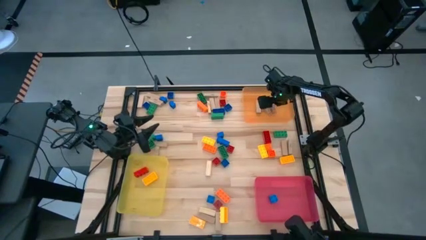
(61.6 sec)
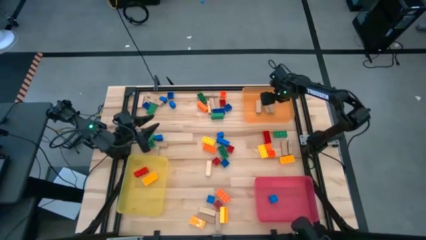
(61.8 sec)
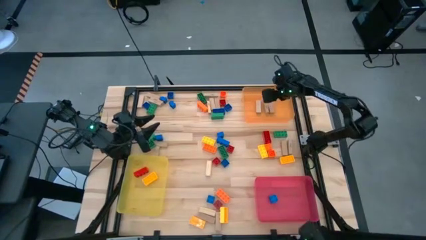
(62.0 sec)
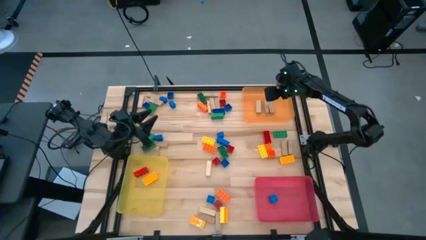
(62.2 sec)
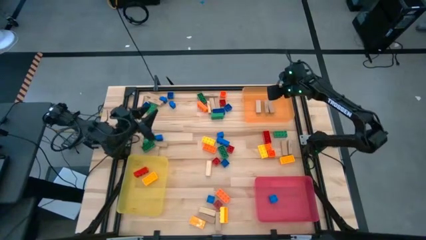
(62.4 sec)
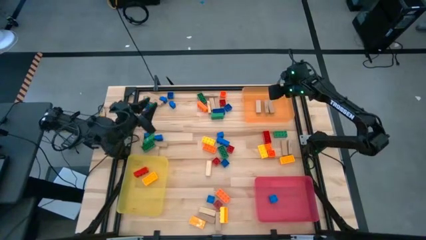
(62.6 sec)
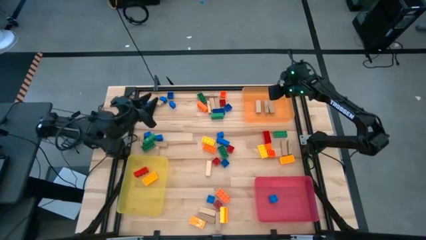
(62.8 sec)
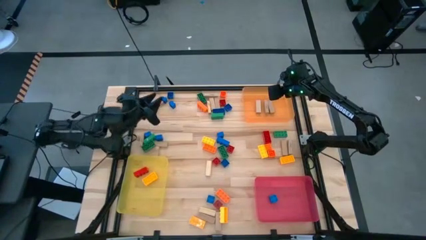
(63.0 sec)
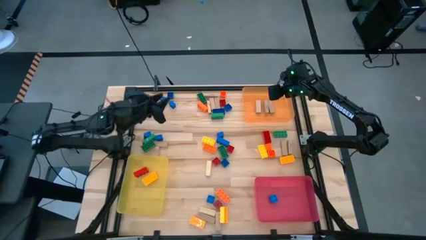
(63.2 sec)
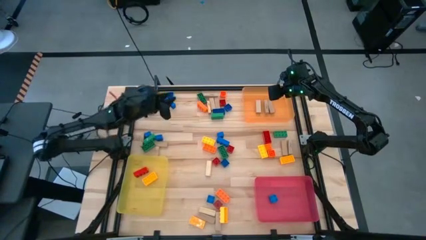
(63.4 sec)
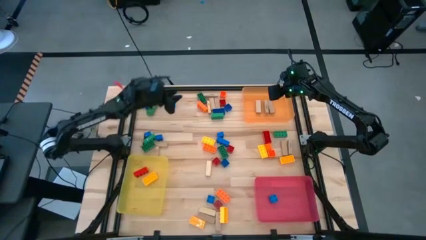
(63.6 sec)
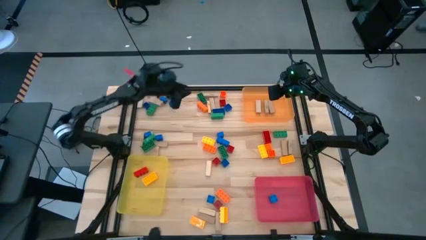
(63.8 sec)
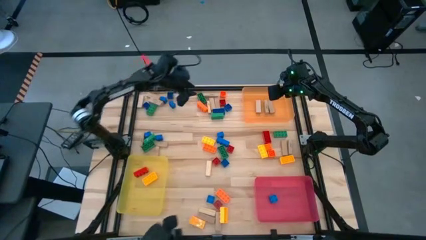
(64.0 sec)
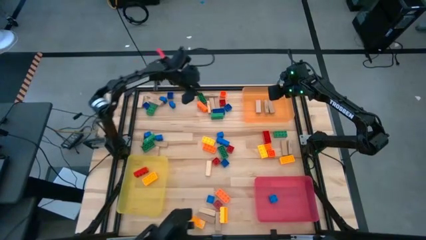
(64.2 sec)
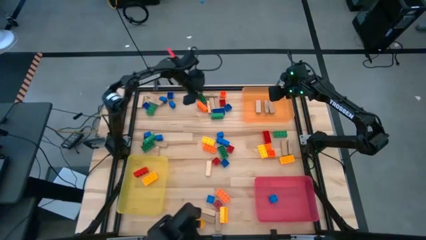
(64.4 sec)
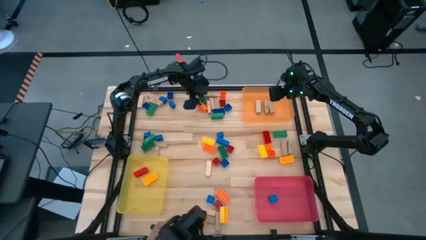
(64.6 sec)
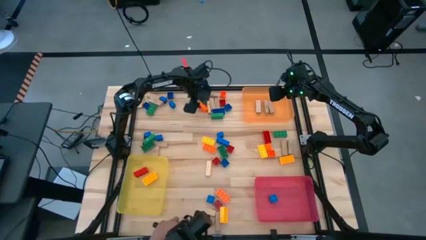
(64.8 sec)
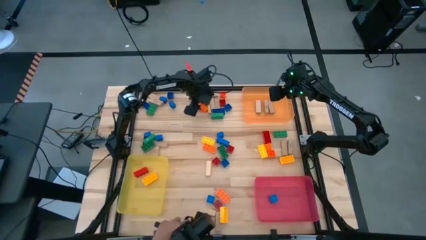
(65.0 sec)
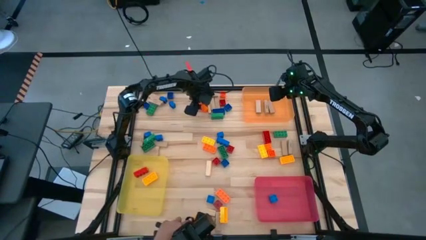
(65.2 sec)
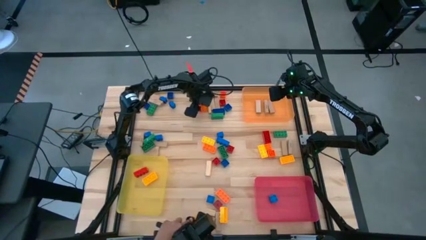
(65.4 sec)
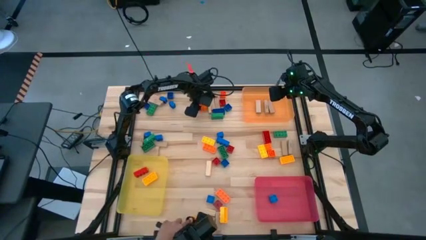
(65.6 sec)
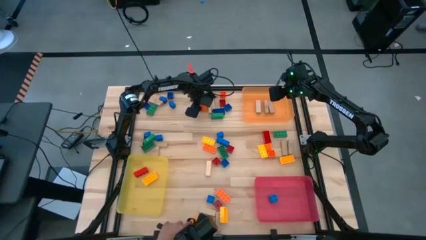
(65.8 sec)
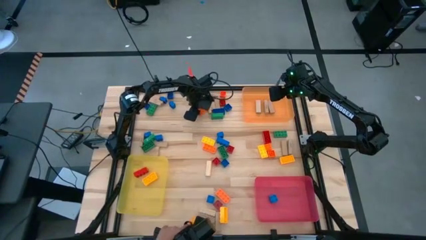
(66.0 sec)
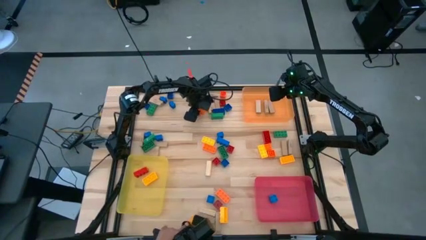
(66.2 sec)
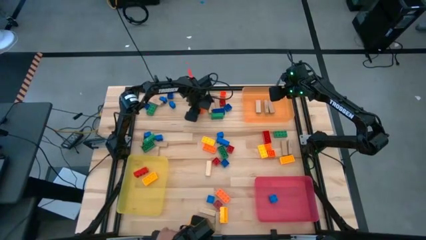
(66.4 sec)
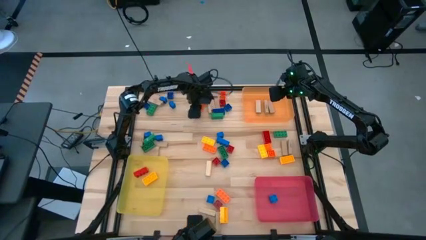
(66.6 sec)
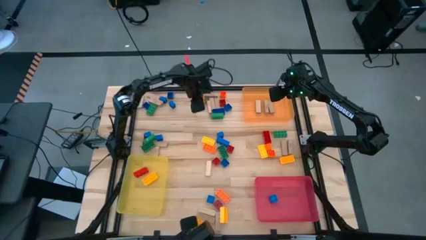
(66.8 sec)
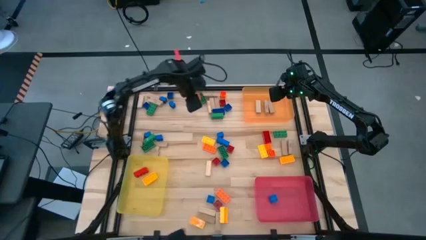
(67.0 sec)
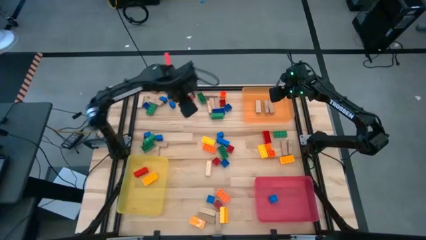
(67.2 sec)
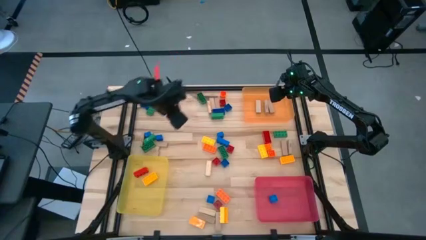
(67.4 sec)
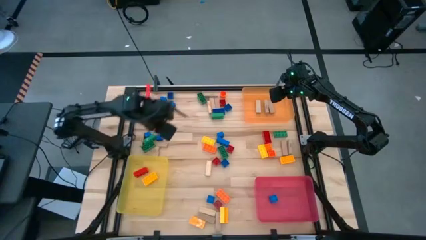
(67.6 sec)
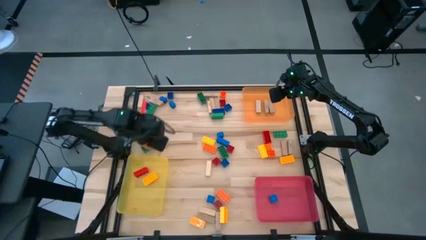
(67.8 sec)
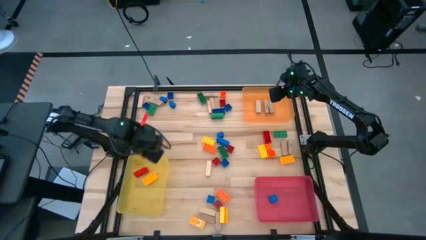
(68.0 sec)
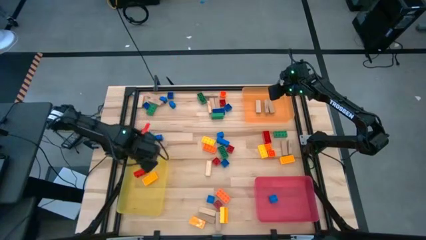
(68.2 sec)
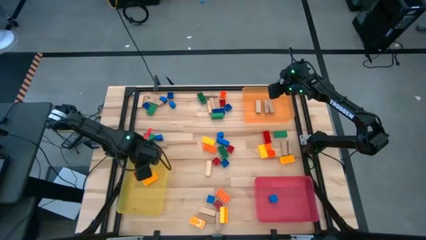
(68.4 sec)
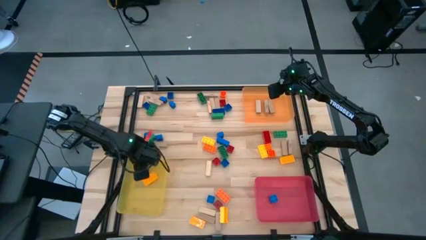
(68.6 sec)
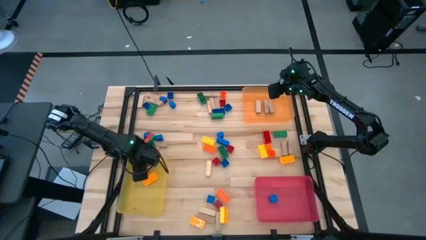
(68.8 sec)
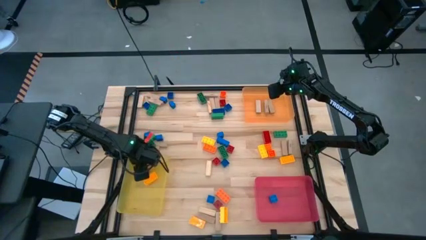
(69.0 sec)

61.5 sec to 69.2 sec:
Task: Sort blocks by size
Put the large orange game piece into the yellow bin

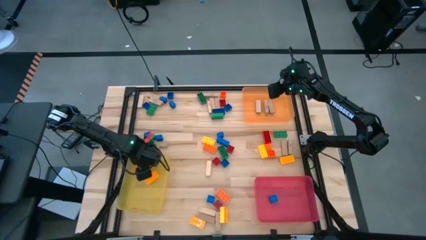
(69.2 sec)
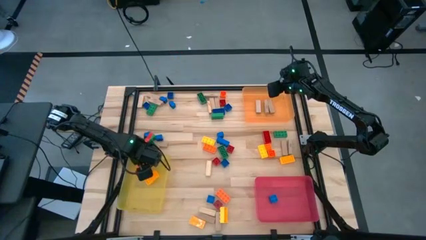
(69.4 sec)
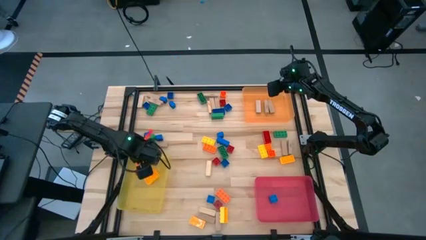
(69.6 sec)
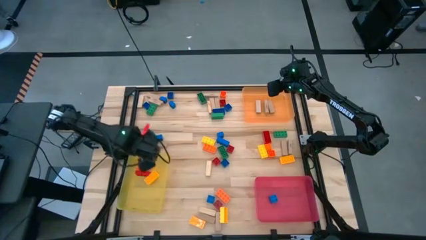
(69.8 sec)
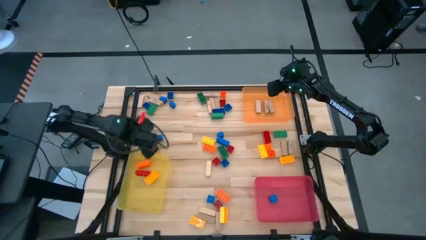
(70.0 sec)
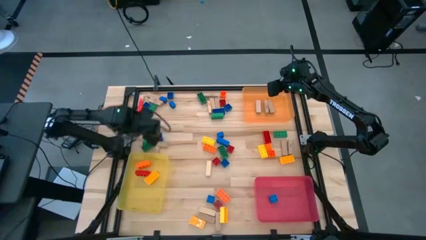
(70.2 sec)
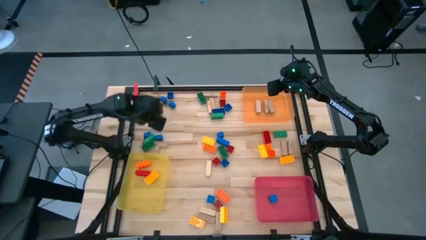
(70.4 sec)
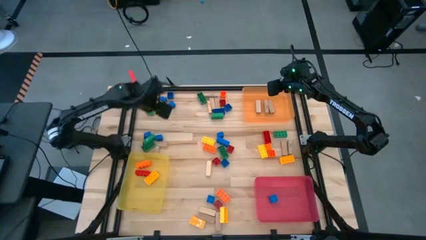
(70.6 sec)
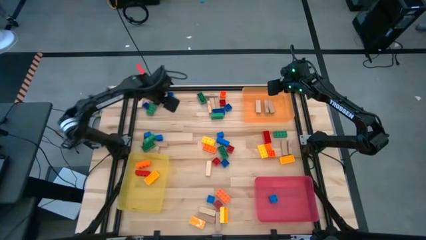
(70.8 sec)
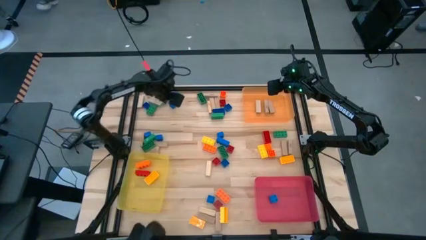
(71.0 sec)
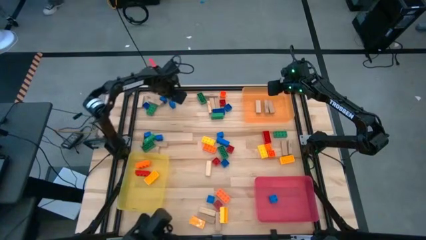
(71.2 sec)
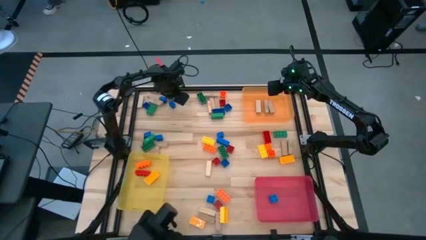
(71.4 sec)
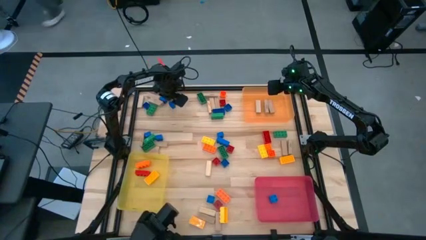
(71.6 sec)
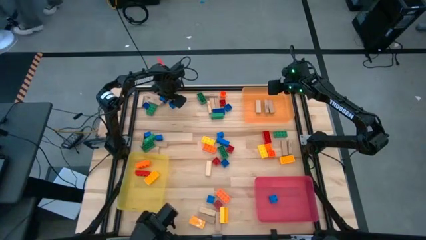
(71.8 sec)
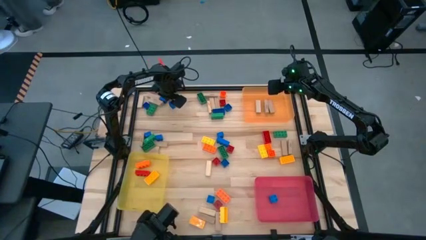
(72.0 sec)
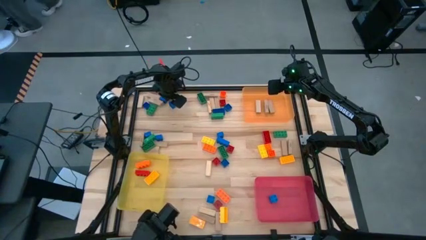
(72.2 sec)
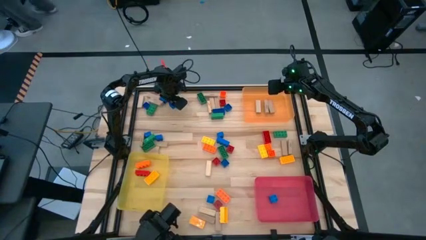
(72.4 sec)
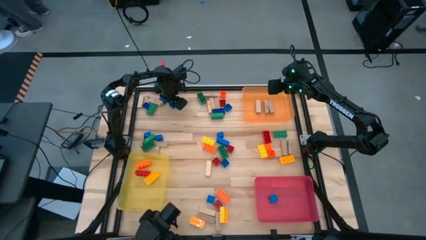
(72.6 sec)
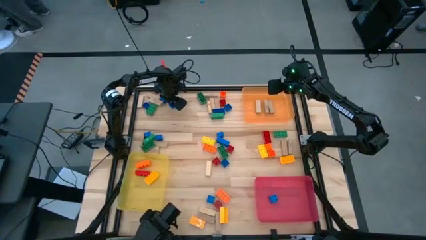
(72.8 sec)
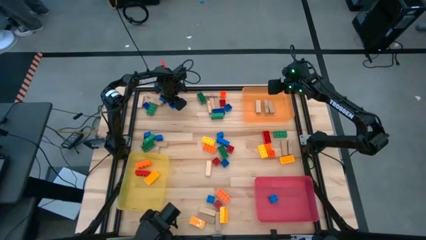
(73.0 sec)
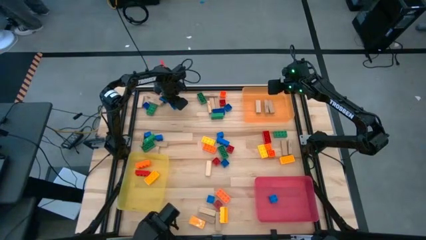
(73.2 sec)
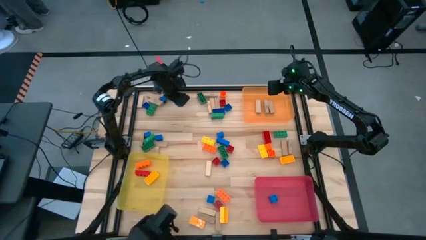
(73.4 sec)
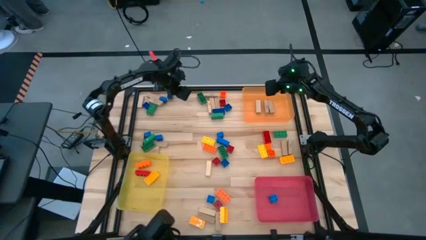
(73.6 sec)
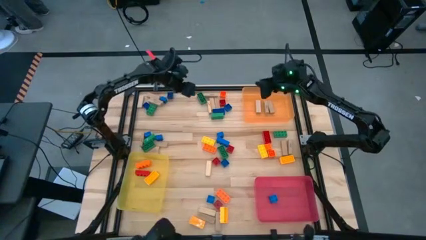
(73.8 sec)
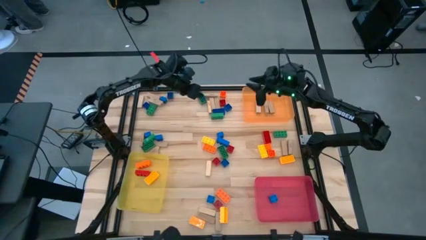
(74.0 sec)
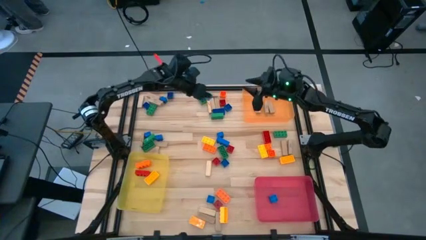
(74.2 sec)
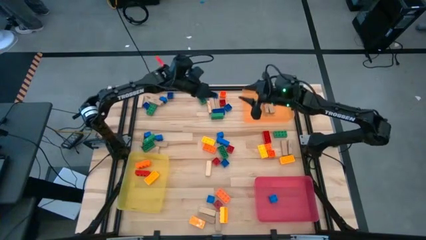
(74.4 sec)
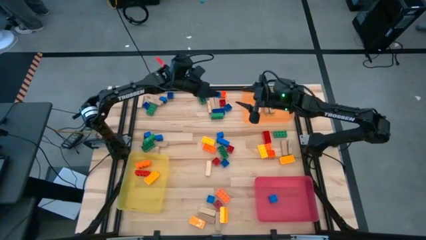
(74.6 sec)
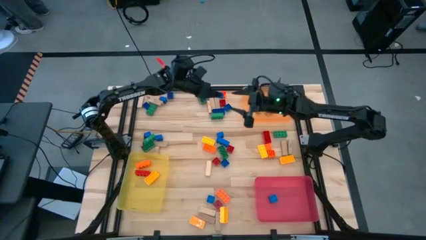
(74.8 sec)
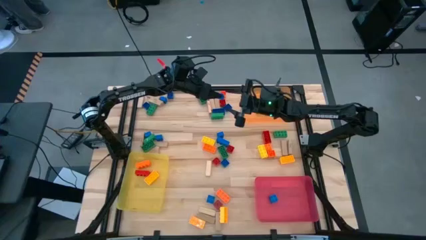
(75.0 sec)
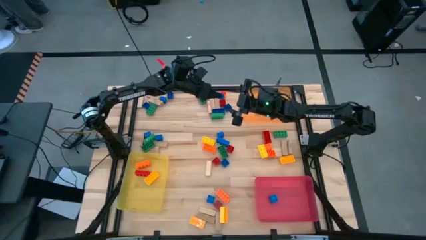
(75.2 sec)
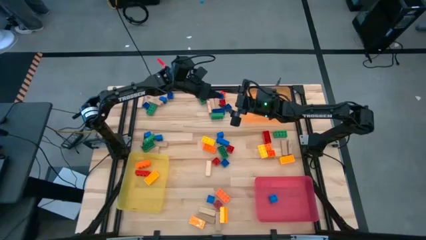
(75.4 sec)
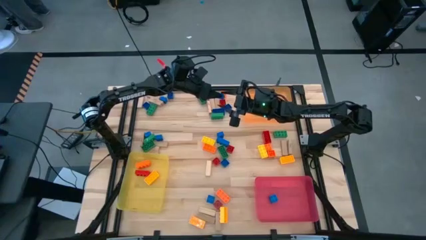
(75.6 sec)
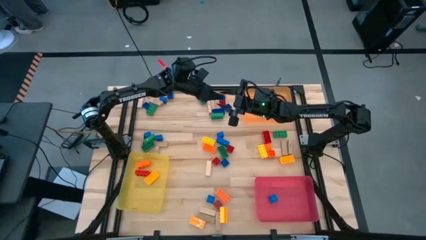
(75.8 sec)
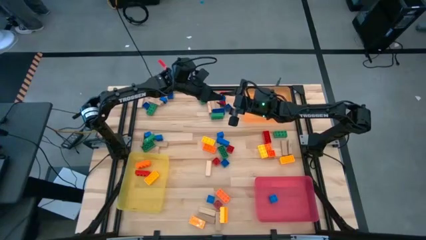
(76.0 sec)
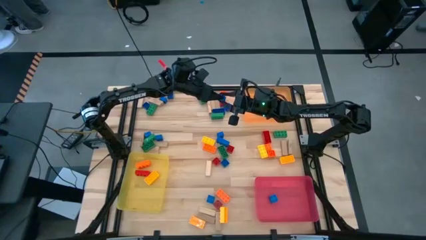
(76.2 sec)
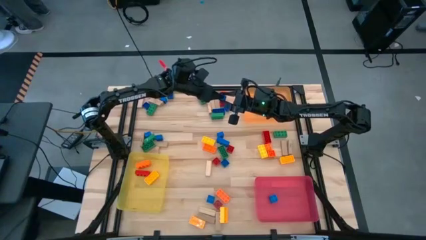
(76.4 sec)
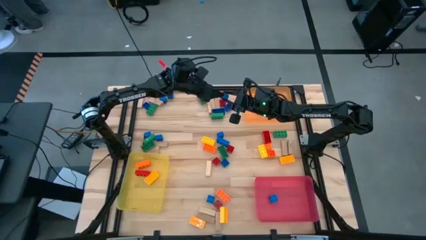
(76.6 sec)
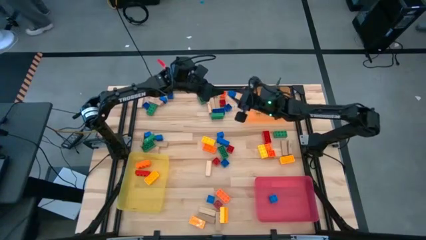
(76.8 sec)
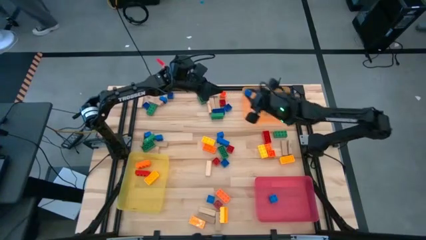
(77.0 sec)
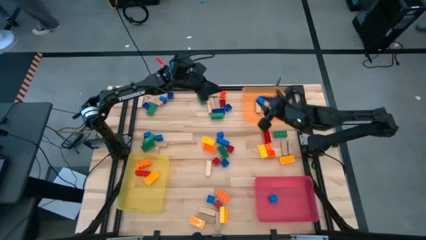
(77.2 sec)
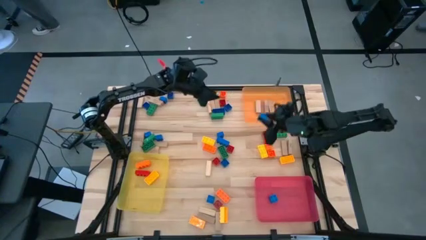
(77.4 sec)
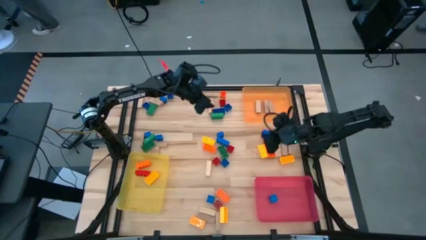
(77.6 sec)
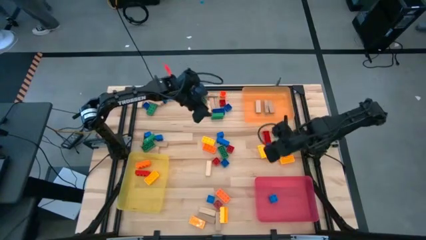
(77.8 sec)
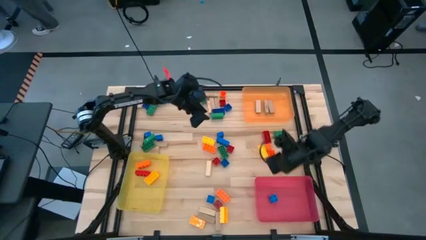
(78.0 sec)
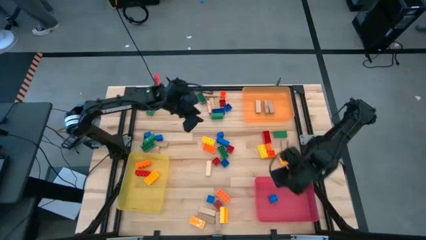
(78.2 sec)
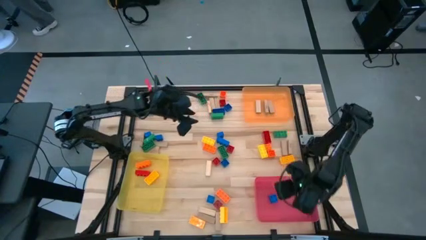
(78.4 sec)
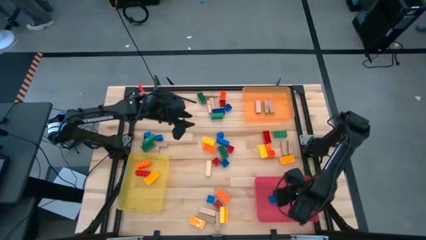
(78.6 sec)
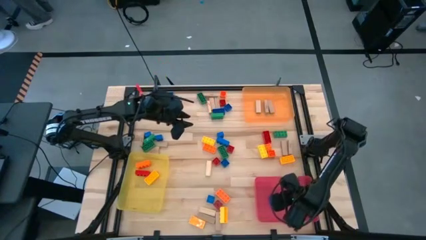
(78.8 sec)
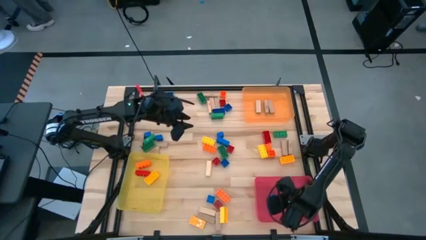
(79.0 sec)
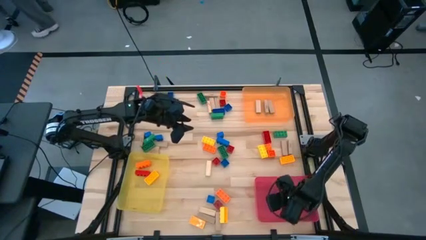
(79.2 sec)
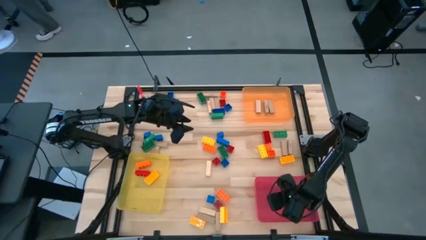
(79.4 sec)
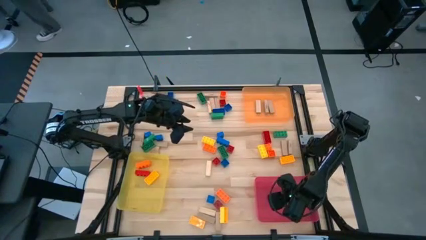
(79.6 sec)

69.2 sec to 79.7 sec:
Put the small blue game piece into the red bin
